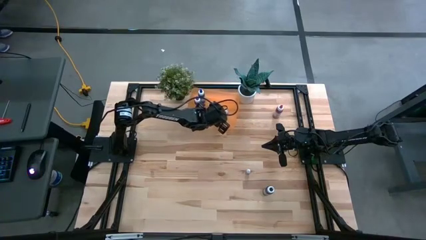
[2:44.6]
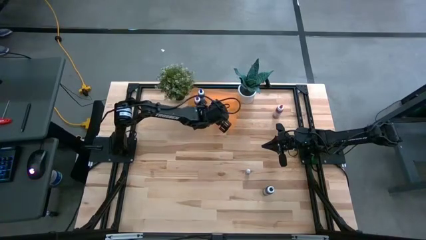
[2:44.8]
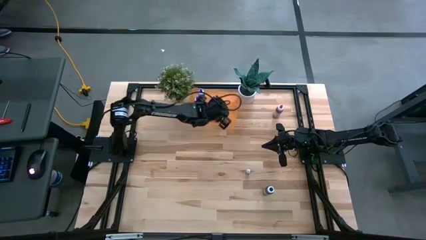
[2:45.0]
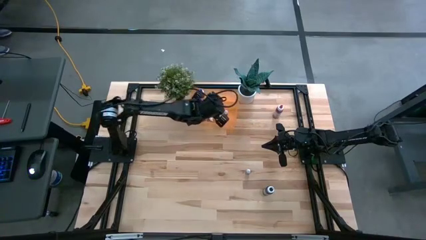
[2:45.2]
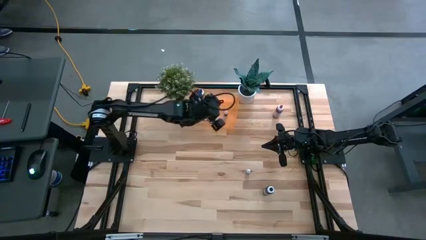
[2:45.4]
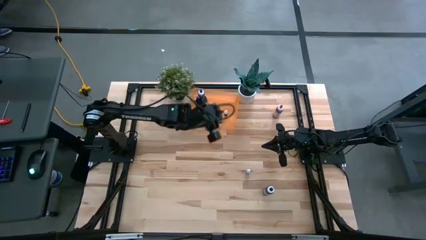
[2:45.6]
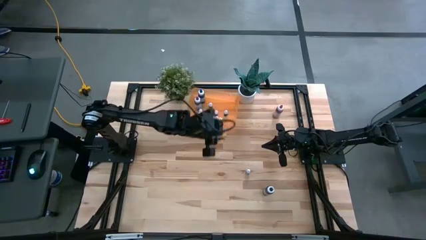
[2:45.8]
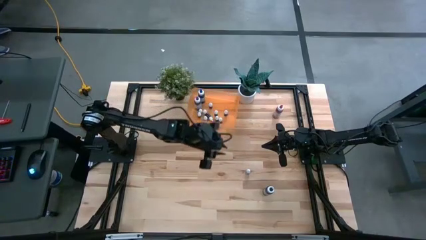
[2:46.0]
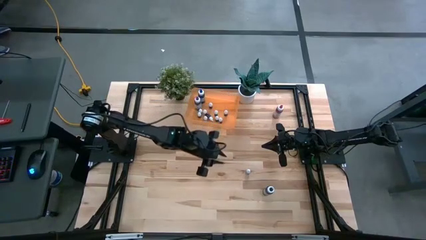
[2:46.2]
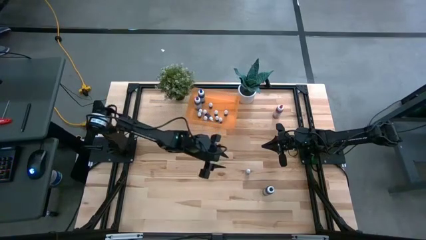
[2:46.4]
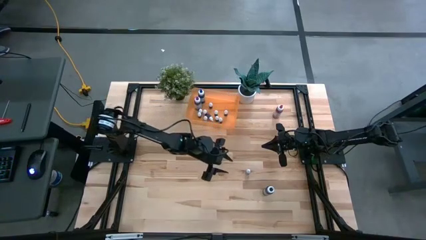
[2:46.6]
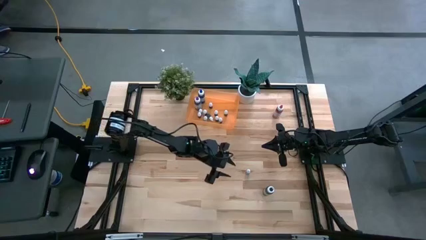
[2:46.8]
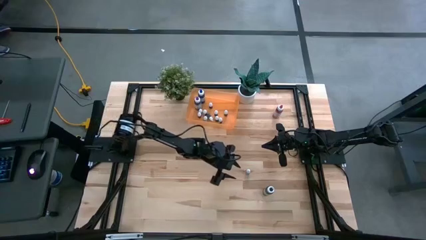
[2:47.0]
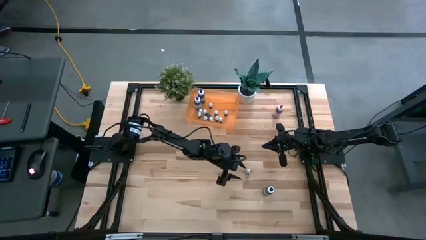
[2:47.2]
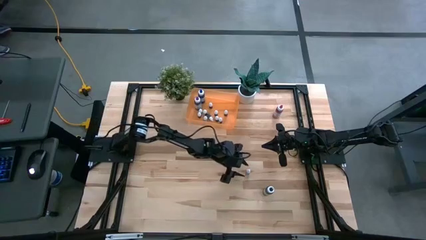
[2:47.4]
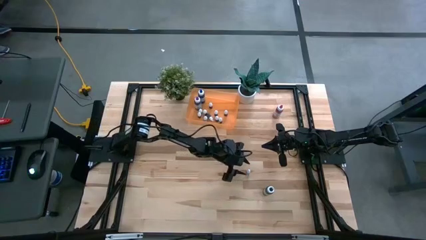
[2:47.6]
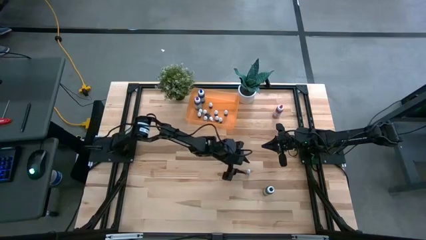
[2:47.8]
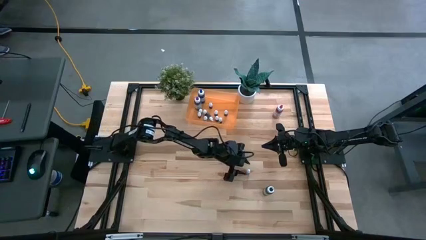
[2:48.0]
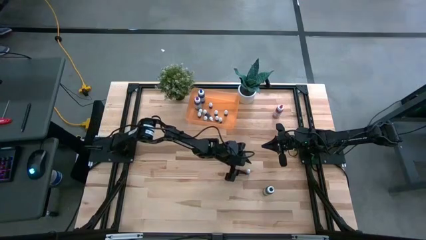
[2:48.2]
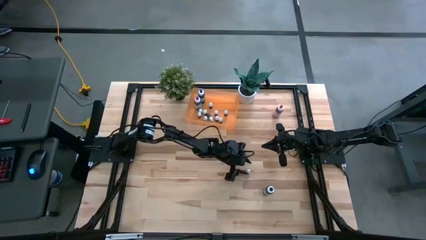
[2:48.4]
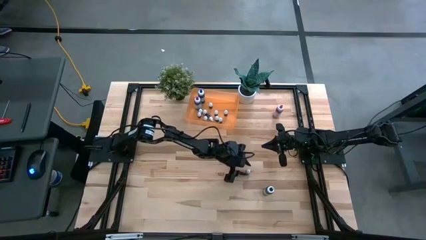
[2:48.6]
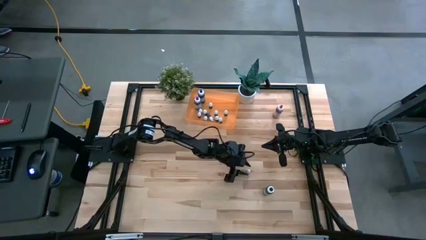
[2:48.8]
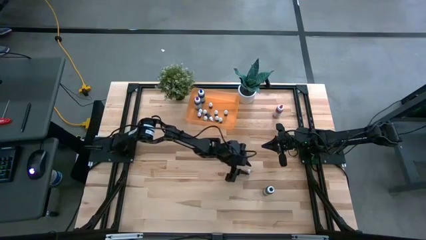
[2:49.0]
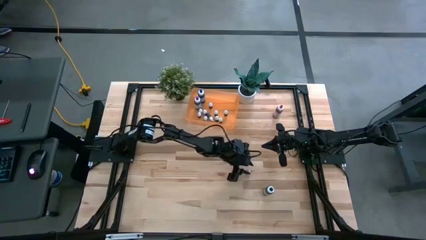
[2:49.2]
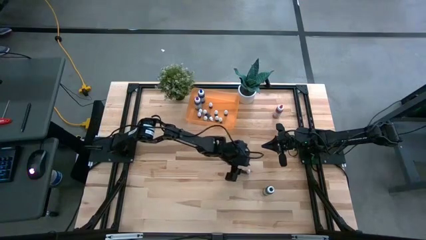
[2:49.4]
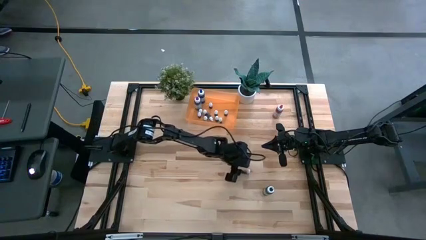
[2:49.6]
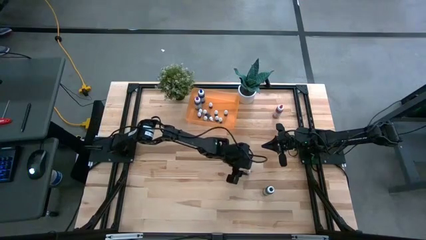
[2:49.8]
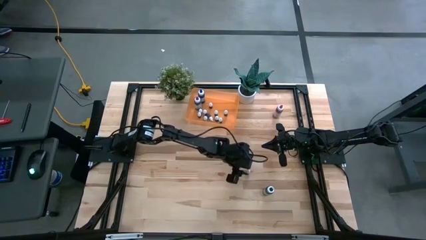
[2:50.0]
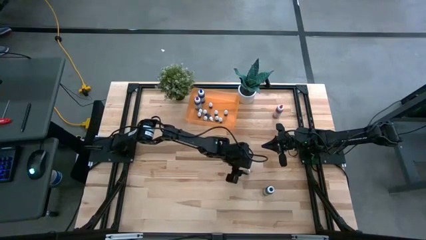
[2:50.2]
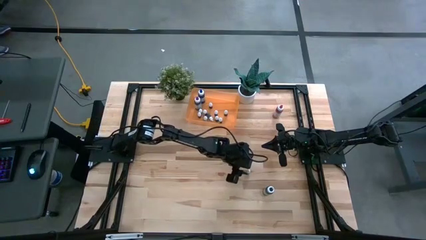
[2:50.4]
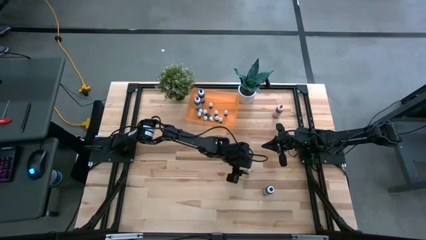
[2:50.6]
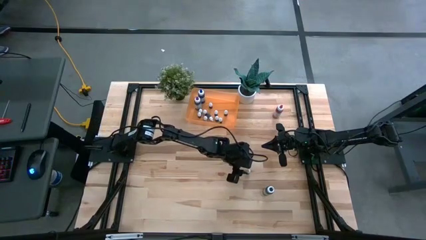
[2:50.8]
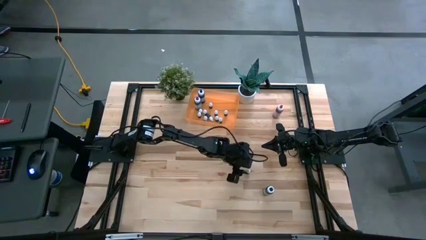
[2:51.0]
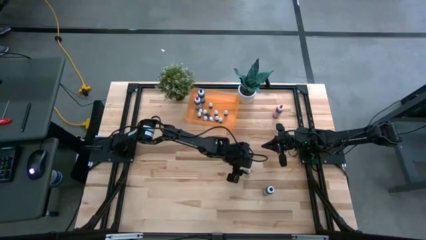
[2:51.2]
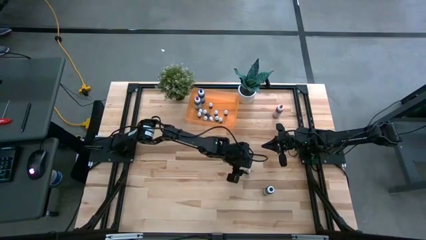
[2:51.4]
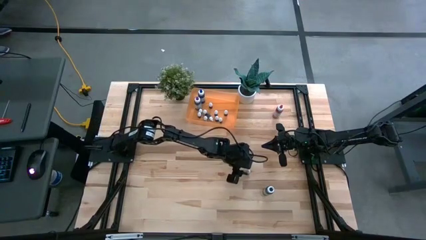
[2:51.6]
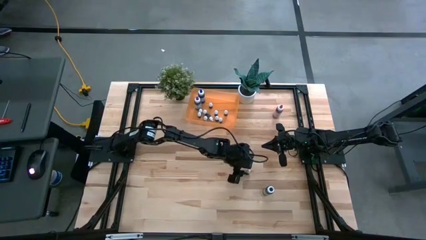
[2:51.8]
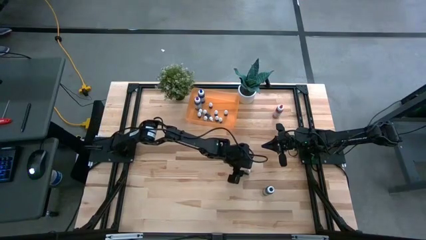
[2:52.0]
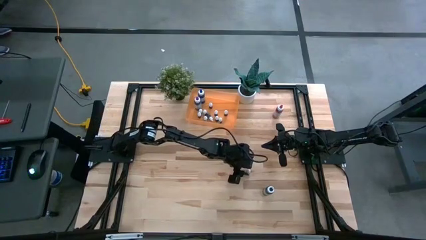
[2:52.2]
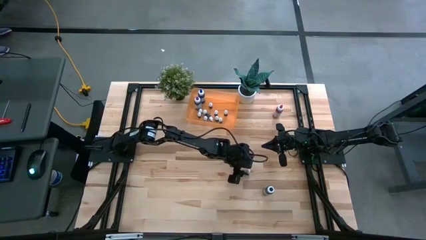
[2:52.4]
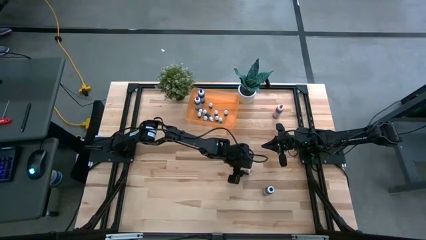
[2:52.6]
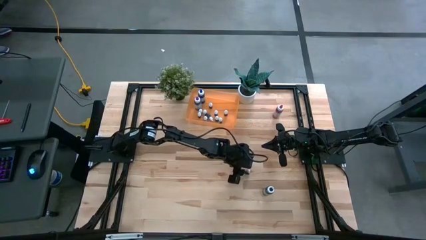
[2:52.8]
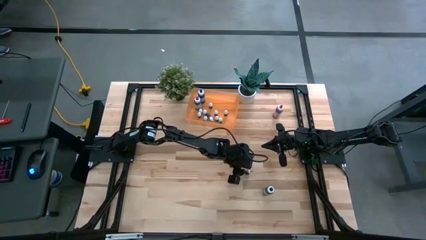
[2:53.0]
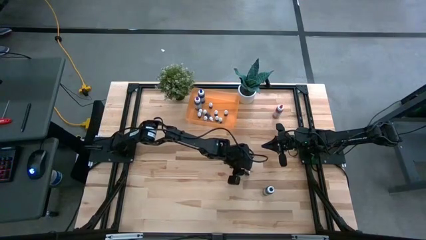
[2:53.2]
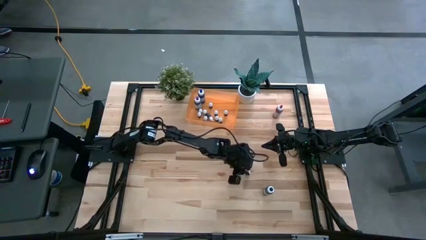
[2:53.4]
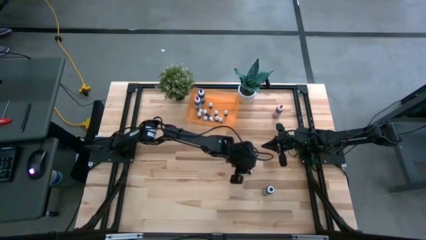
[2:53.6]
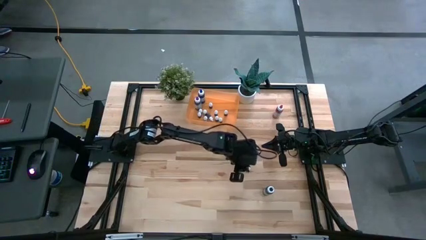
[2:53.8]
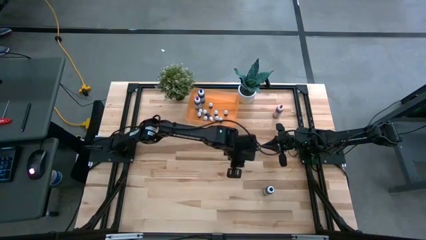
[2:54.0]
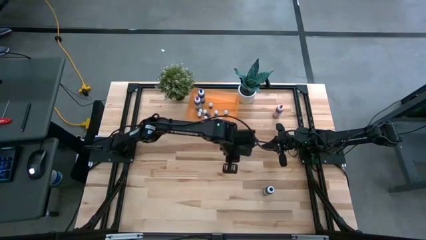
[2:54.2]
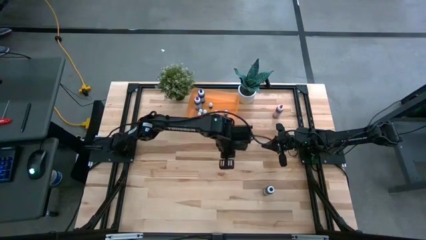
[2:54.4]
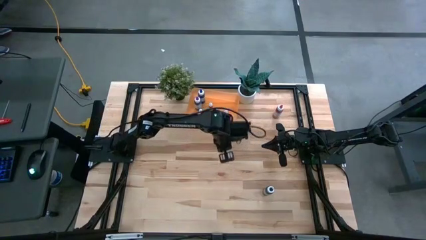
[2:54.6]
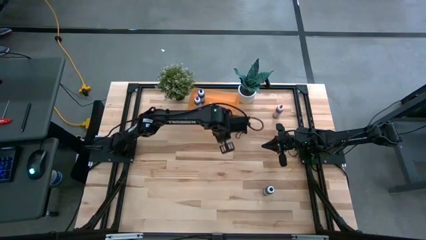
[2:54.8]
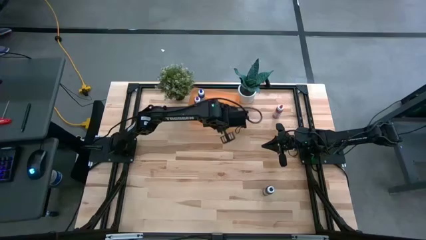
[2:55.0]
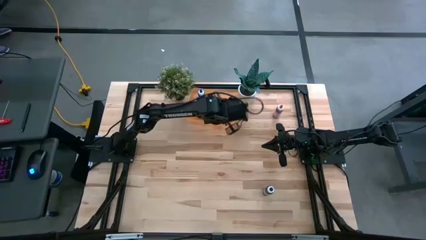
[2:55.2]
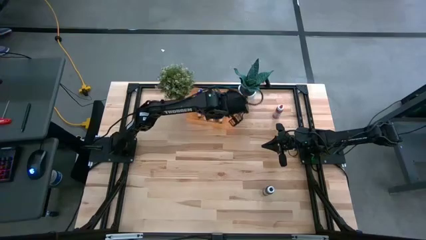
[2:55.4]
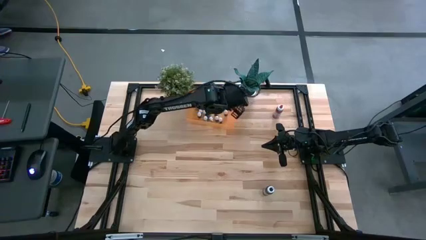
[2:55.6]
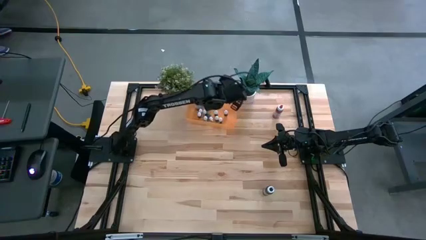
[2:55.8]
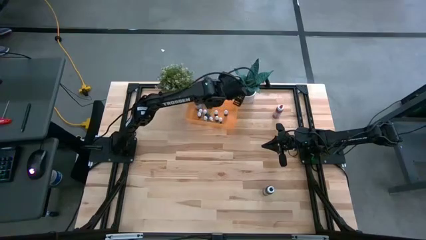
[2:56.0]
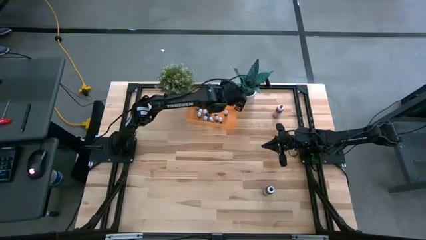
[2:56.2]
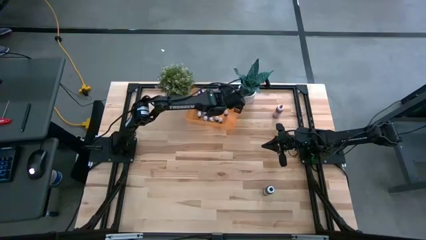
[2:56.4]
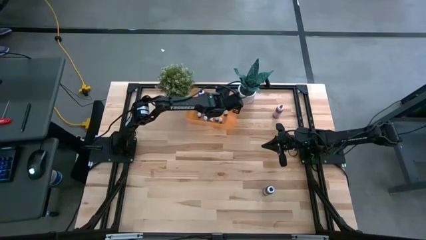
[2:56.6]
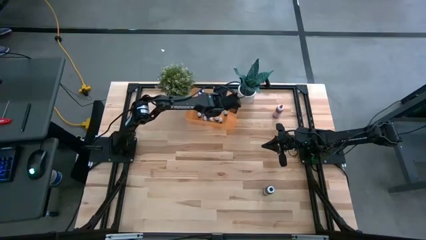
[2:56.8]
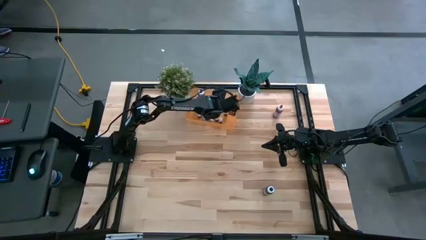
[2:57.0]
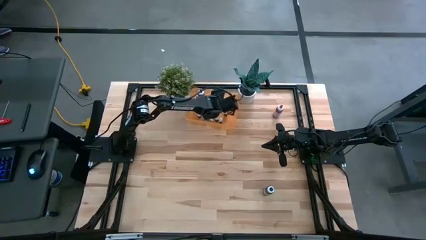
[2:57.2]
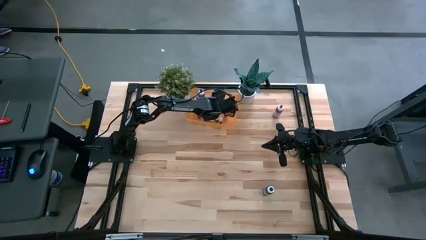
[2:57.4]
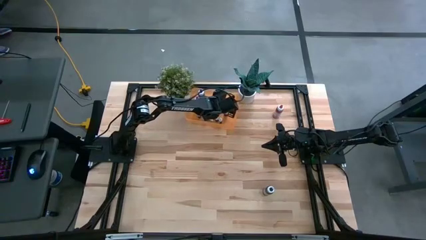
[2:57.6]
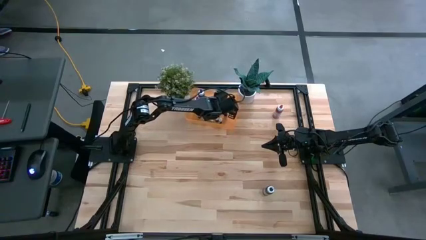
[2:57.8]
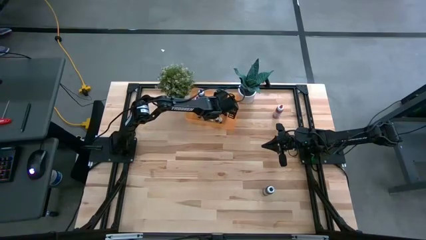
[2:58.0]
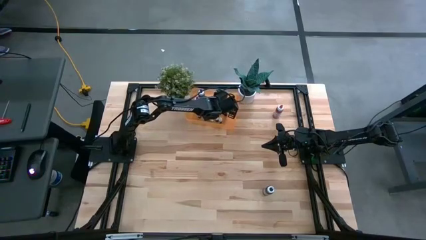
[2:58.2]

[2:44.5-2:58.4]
Task: Pick & Place food coloring
Put the small violet bottle into the bin
